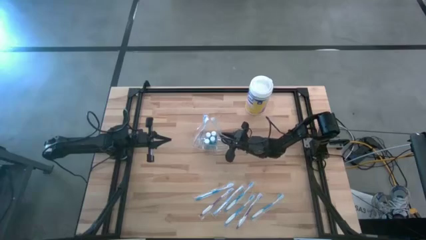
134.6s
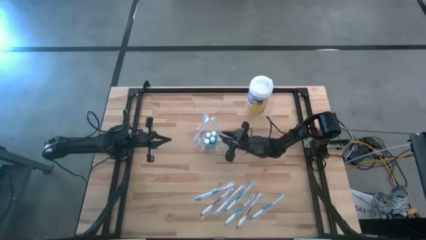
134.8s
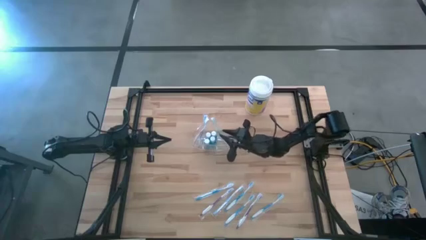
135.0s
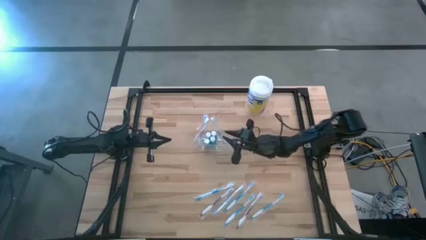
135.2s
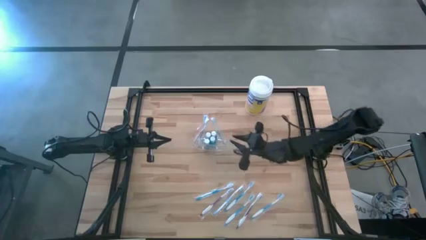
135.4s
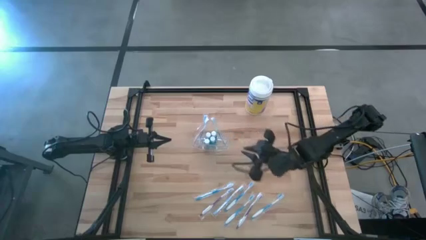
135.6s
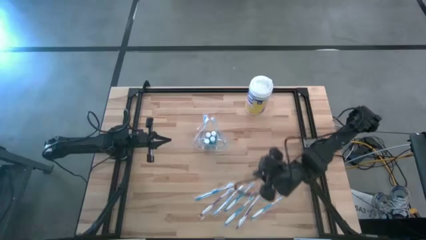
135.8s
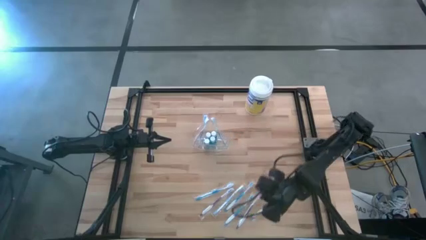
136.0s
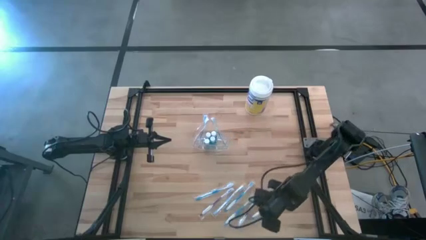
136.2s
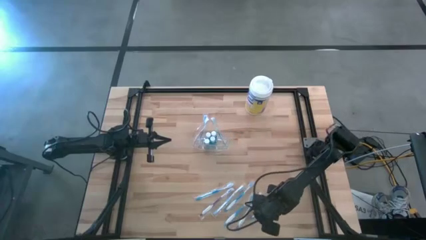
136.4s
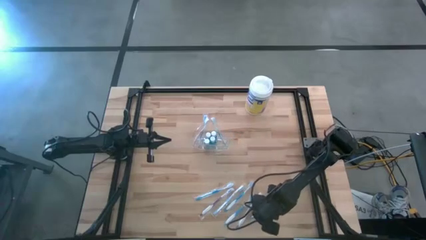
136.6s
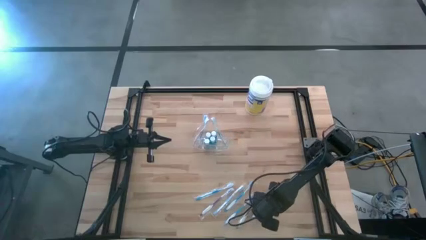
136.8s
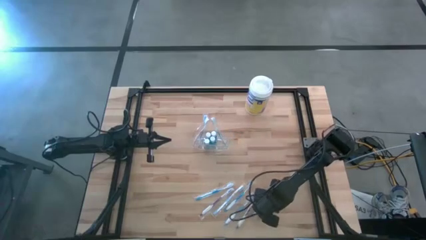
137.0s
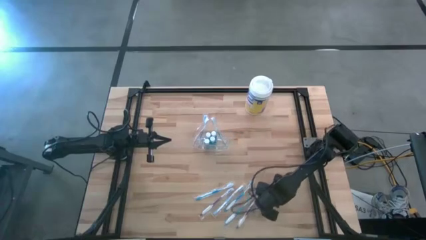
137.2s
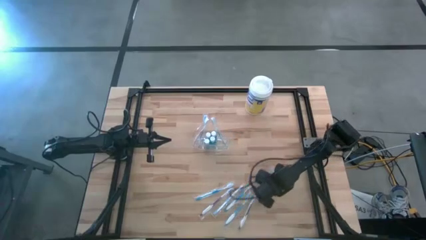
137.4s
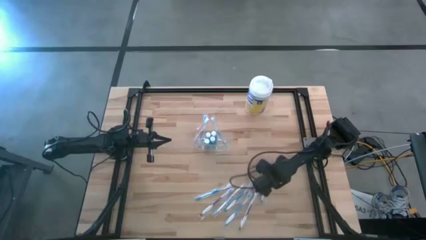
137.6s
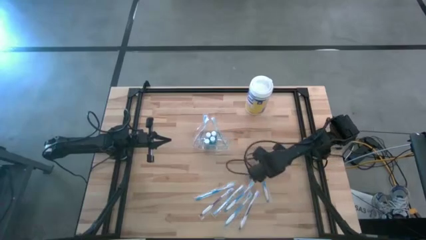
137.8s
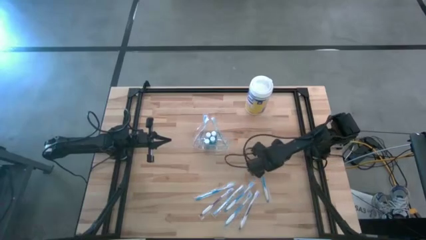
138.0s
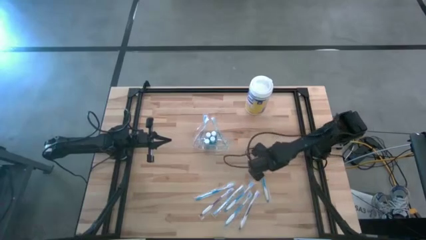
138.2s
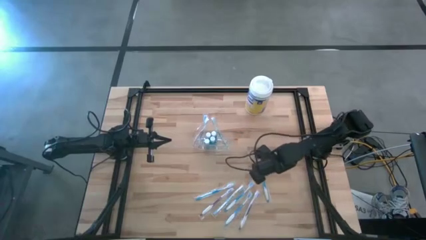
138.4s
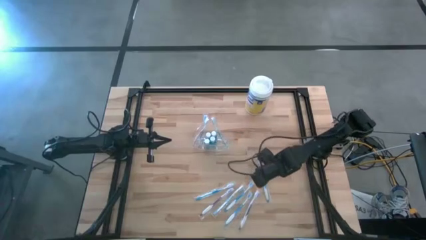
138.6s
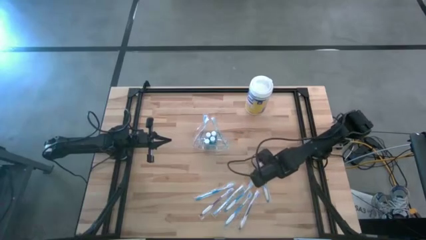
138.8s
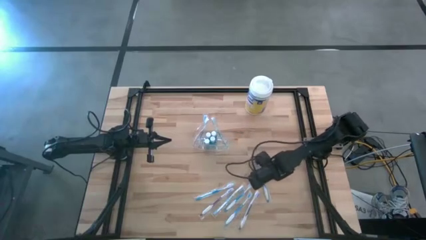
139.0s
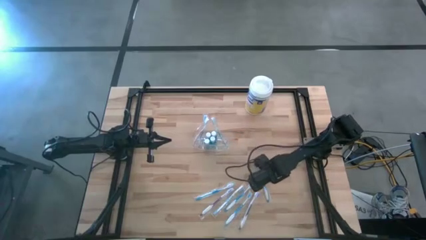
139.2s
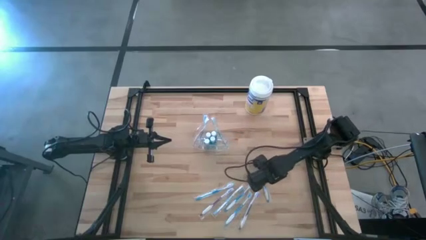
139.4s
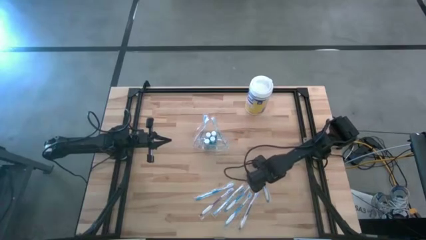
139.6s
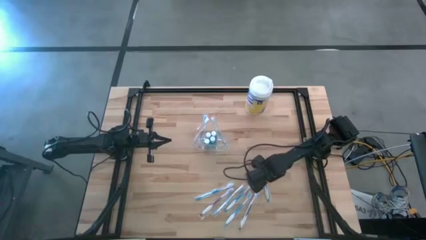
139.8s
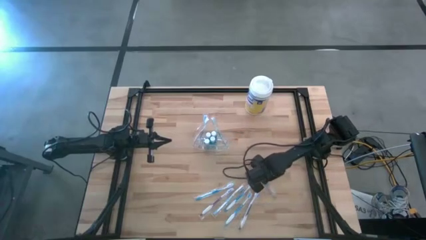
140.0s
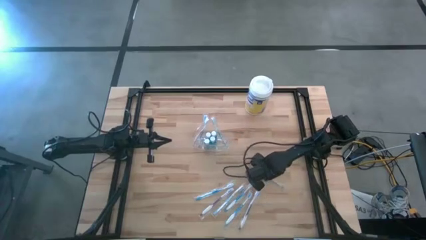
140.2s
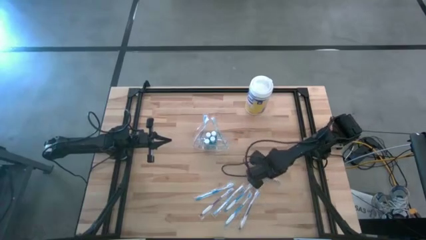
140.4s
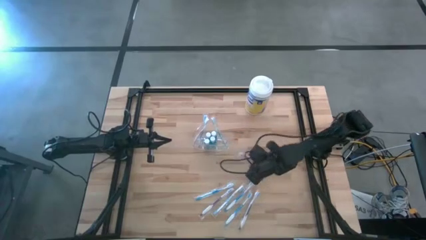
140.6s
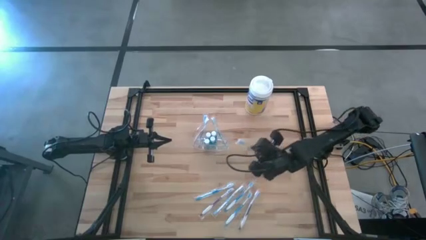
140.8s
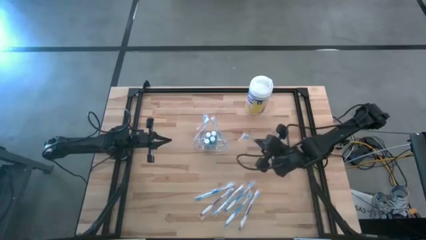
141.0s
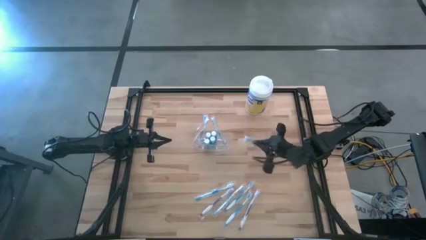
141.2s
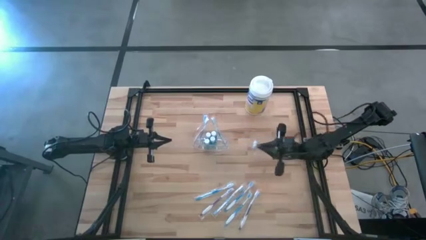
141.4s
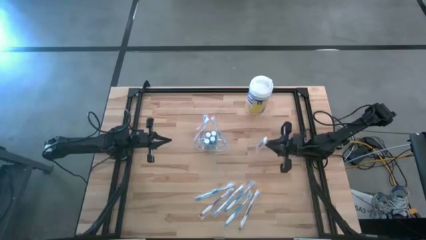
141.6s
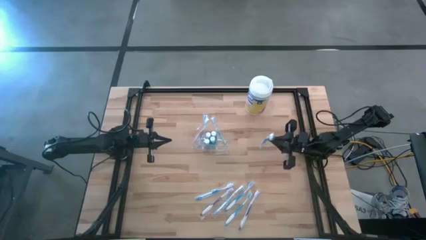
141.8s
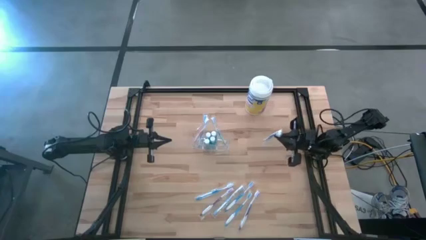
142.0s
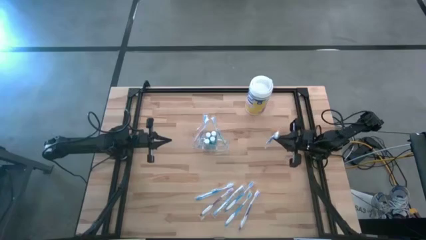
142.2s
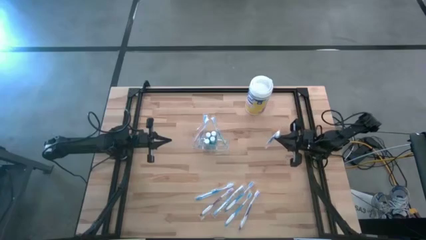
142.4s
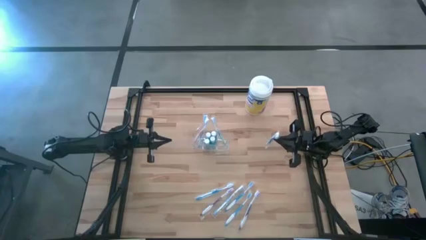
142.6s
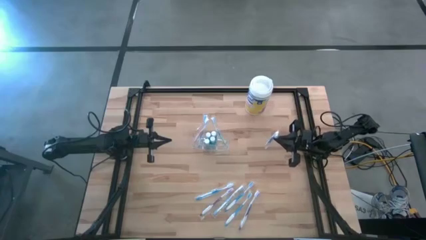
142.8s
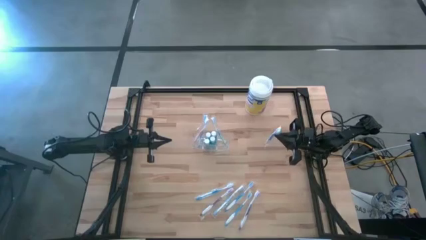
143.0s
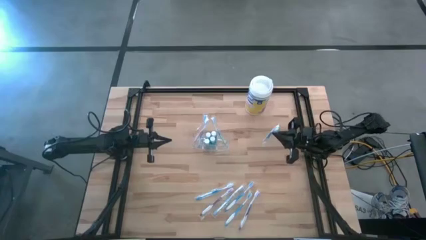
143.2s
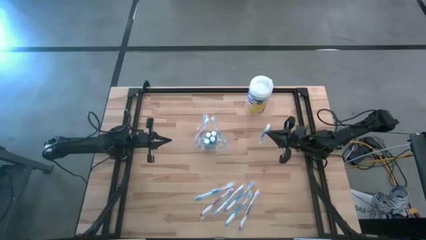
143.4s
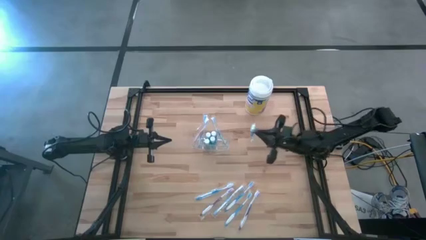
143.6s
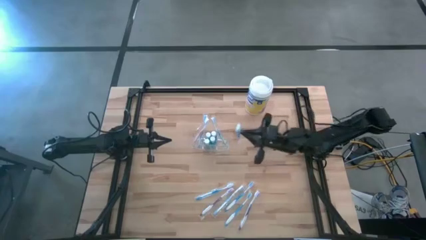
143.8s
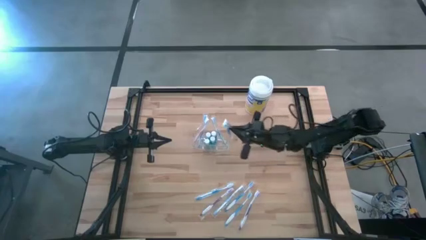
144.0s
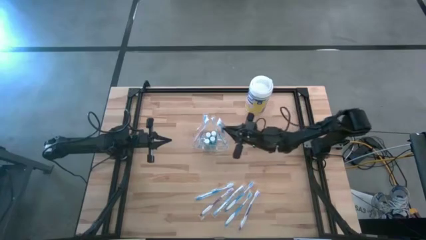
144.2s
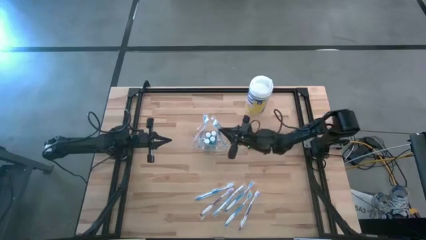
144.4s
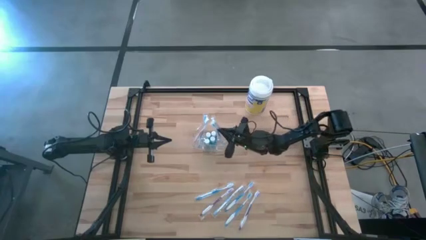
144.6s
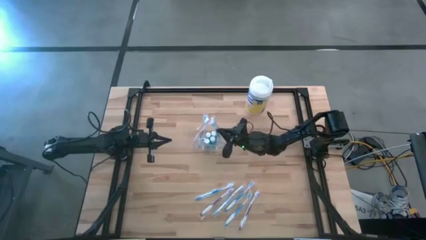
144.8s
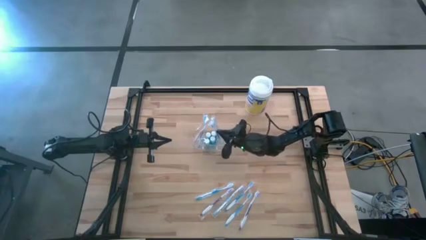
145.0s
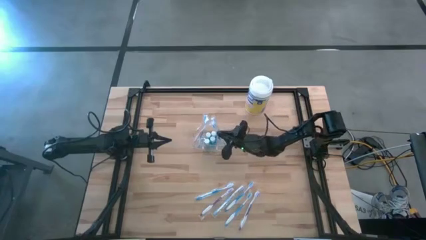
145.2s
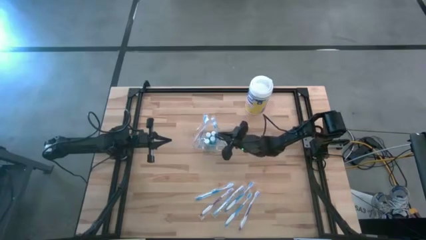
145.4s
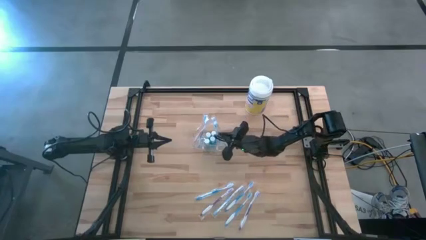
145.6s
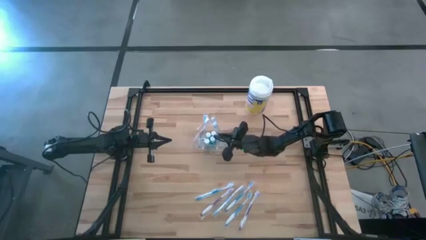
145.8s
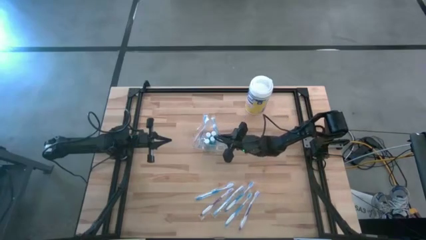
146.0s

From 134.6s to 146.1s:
Task: Pick & Place toothbrushing station
Put the blue toothbrush into the transparent organizer

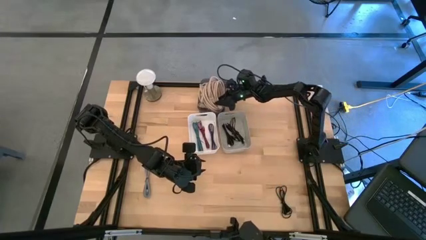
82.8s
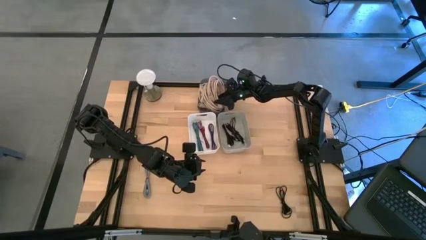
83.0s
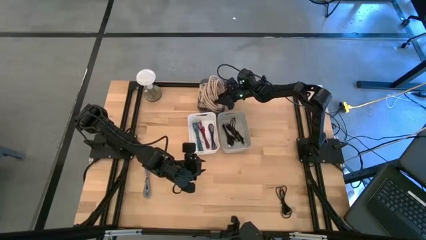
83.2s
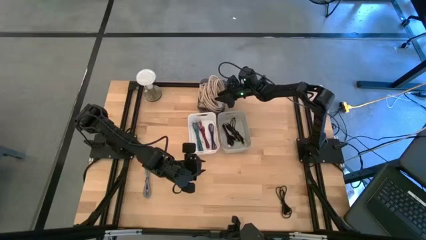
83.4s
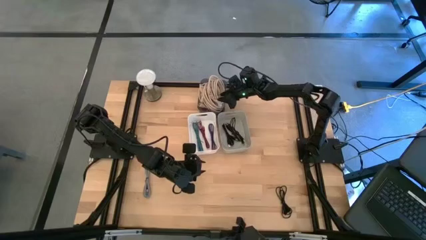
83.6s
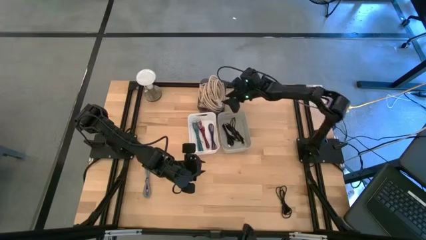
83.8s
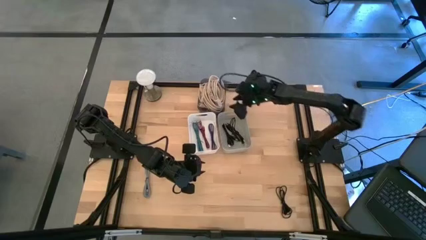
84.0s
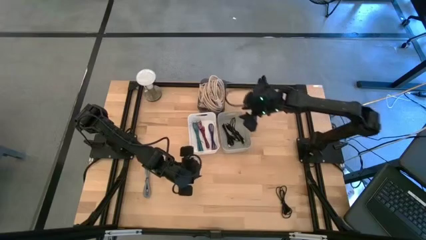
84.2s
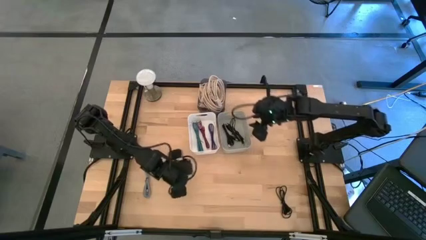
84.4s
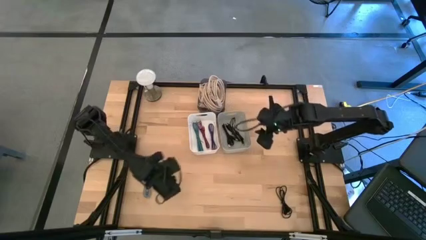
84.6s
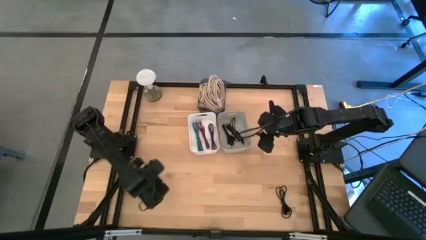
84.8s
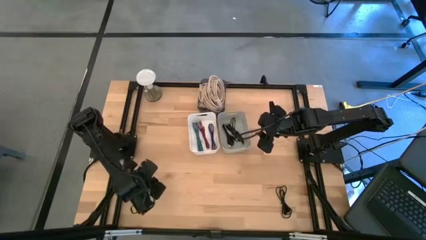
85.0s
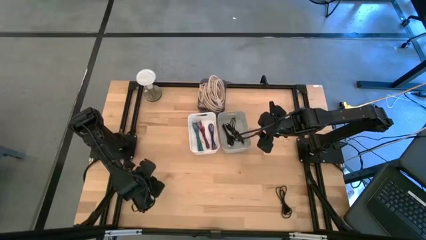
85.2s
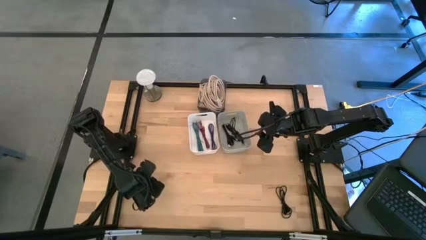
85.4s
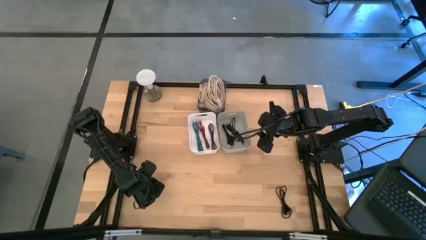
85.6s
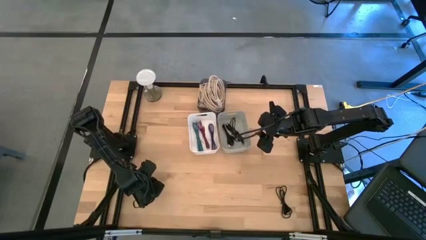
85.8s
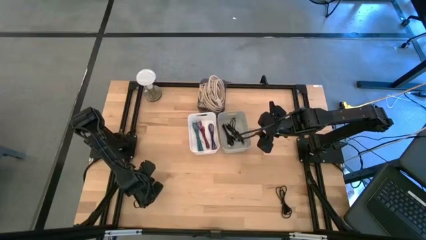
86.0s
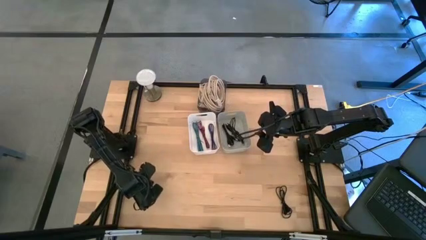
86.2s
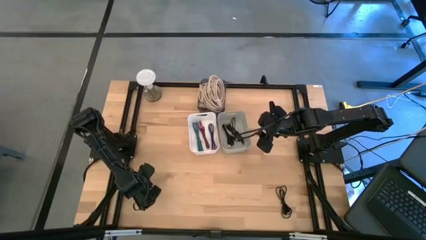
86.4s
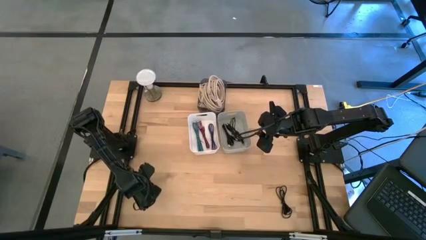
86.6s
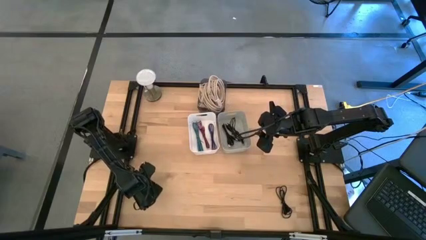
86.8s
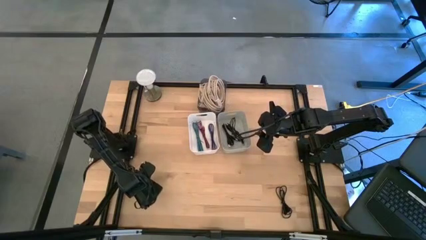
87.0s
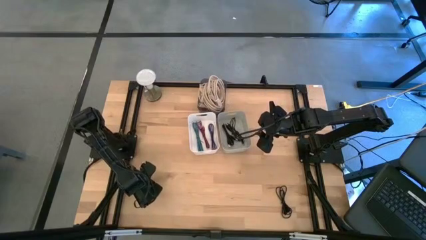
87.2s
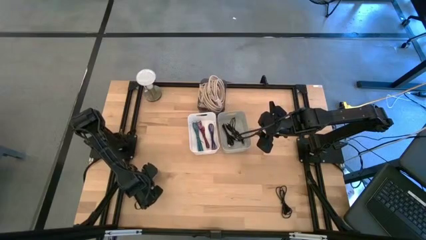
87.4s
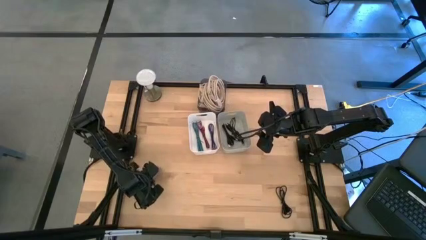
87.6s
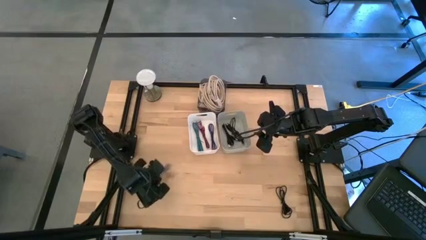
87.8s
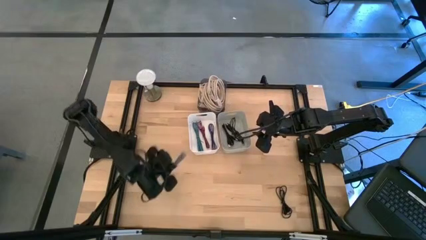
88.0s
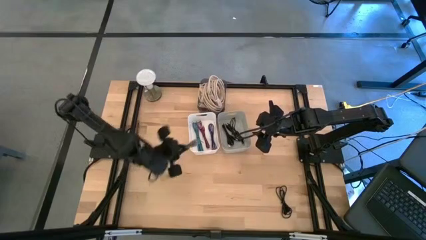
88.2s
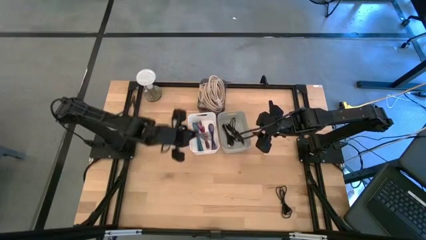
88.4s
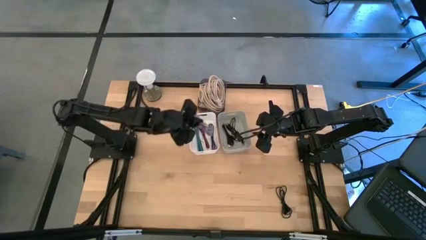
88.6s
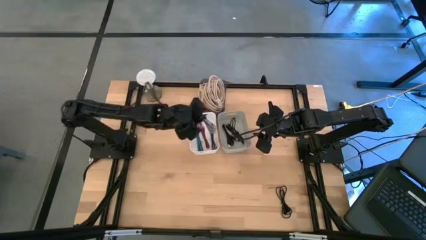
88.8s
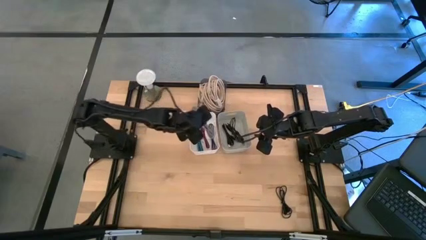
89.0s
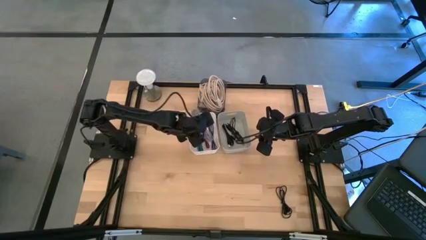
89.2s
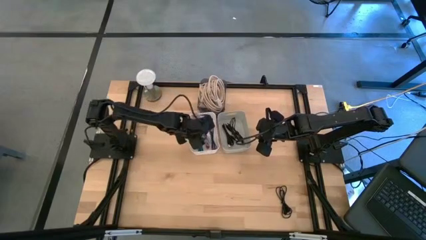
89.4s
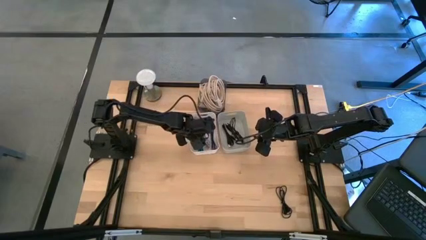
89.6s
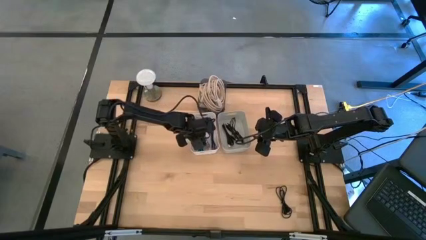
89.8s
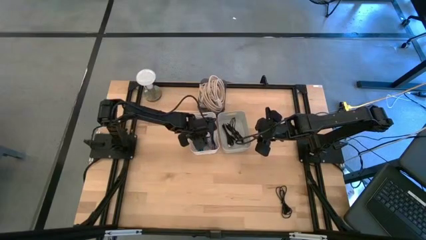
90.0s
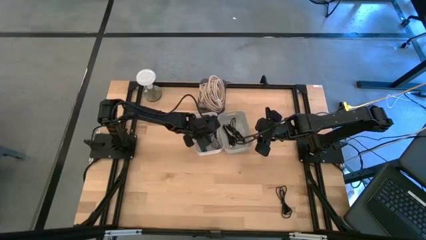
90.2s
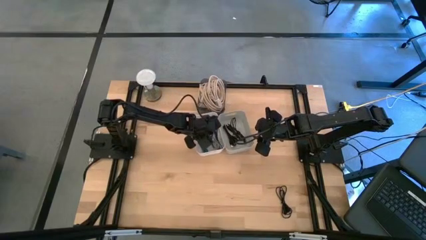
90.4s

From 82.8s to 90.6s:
Task: Pick & Place USB Port
Put the white and black charger cable into the white bin
